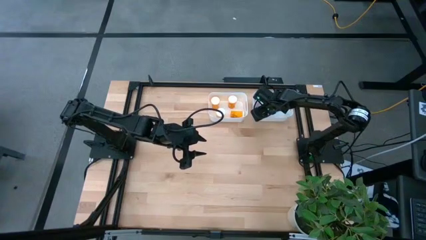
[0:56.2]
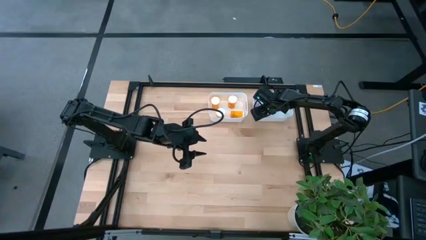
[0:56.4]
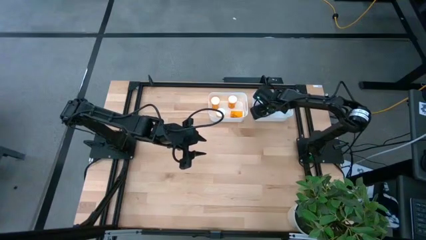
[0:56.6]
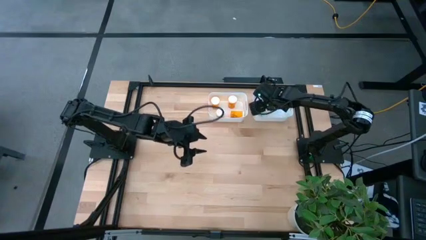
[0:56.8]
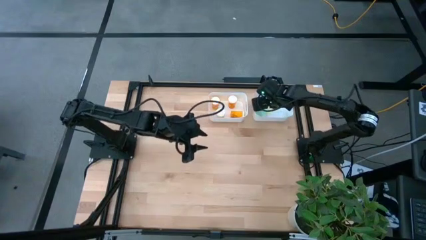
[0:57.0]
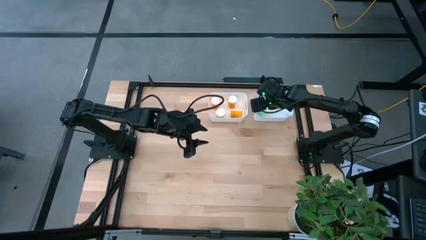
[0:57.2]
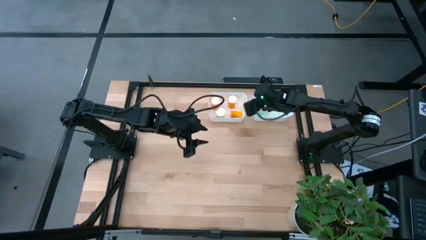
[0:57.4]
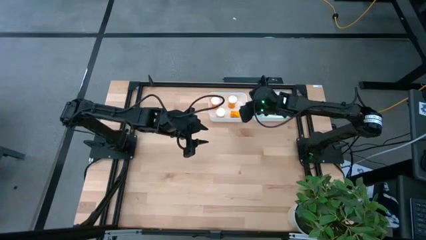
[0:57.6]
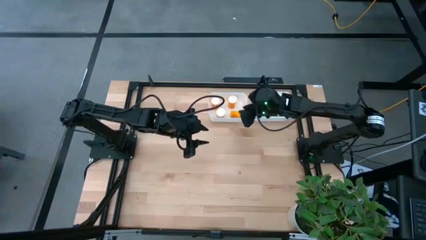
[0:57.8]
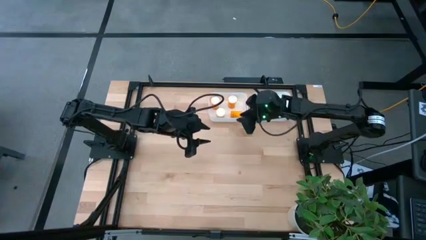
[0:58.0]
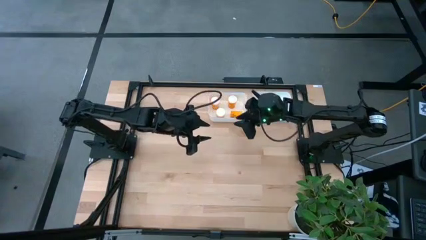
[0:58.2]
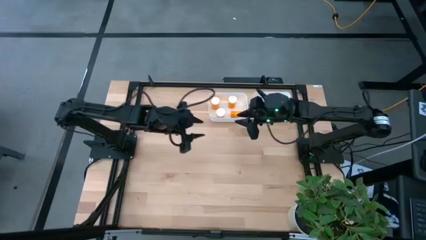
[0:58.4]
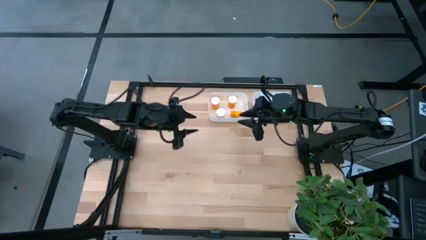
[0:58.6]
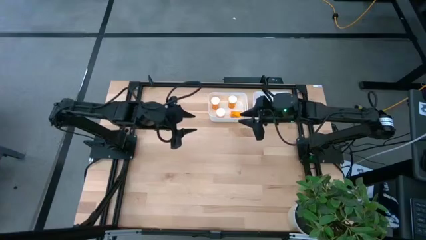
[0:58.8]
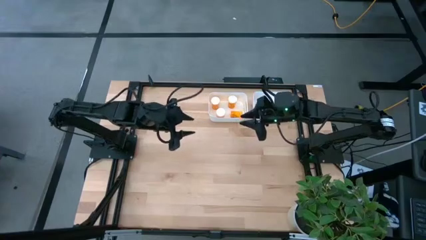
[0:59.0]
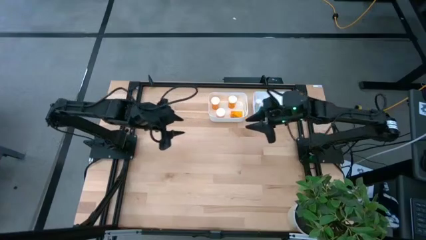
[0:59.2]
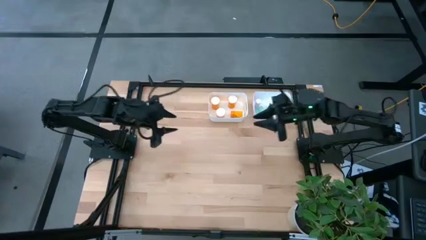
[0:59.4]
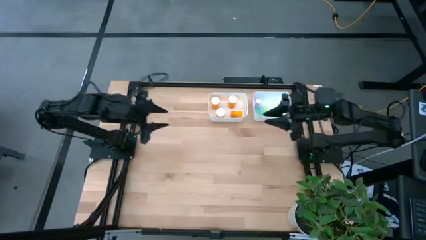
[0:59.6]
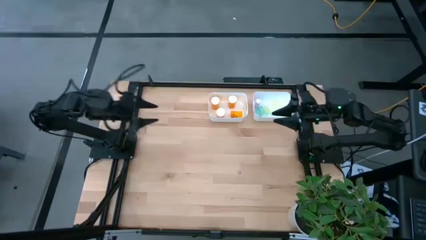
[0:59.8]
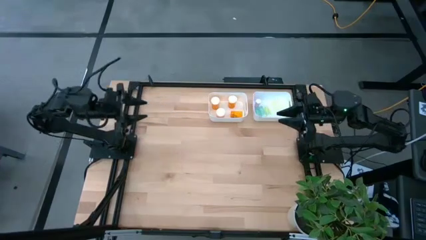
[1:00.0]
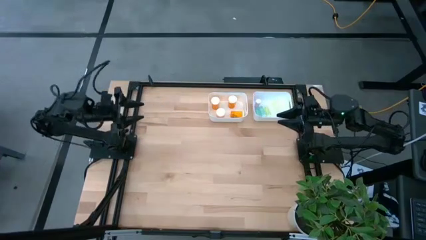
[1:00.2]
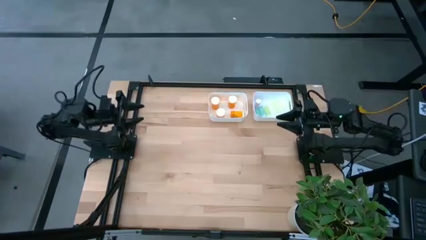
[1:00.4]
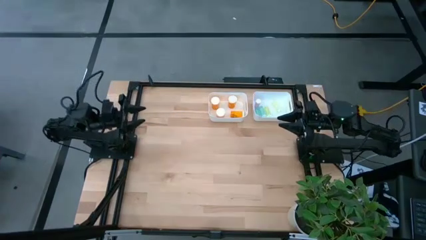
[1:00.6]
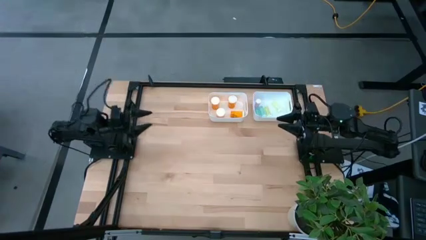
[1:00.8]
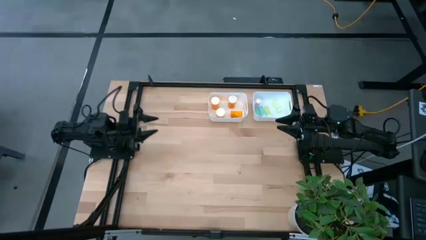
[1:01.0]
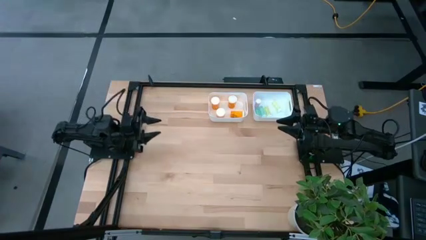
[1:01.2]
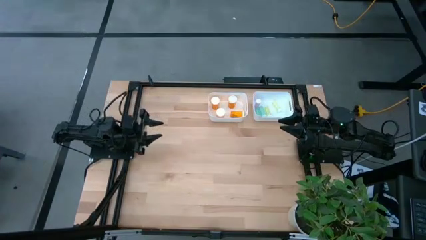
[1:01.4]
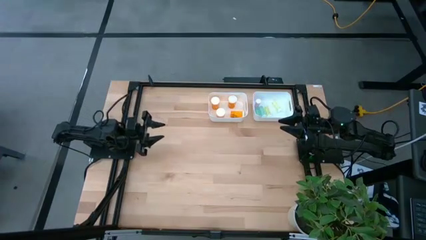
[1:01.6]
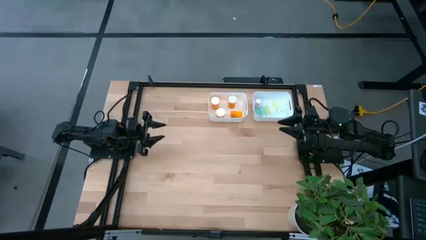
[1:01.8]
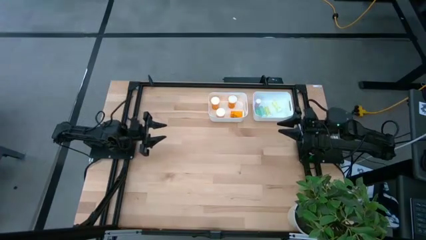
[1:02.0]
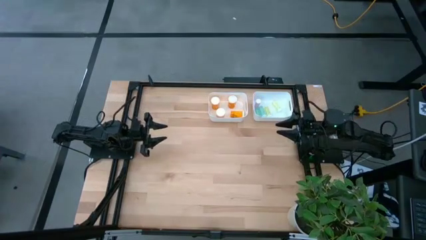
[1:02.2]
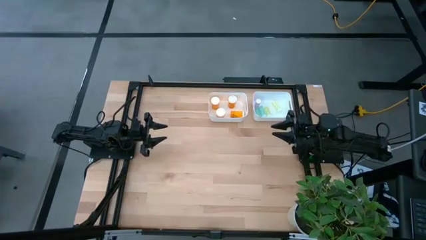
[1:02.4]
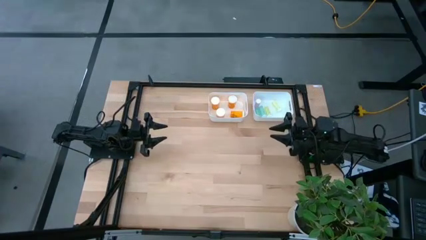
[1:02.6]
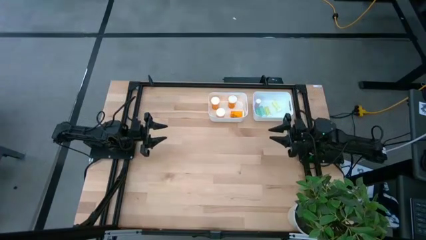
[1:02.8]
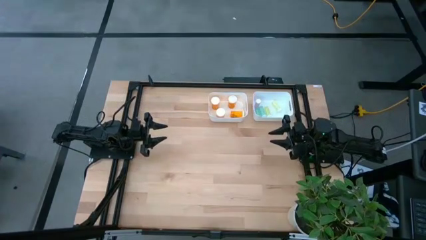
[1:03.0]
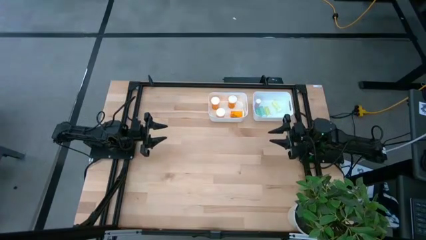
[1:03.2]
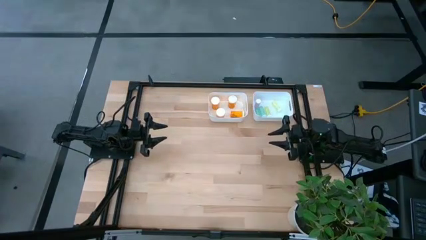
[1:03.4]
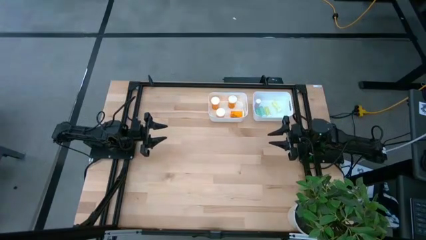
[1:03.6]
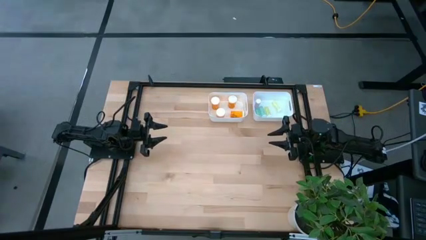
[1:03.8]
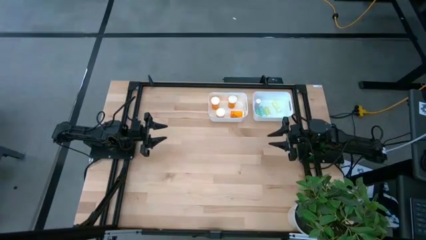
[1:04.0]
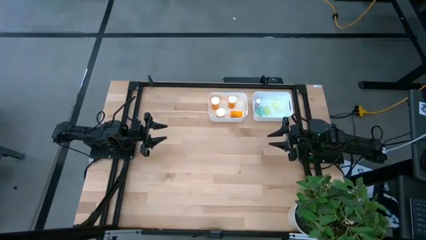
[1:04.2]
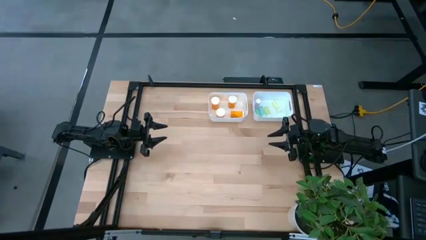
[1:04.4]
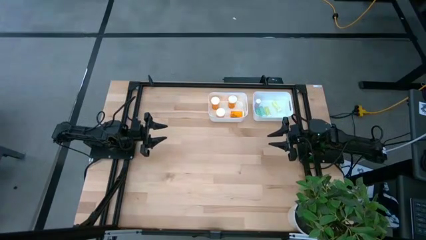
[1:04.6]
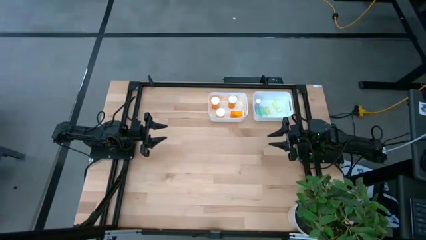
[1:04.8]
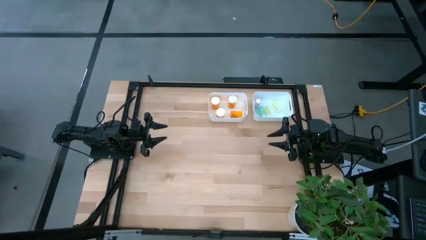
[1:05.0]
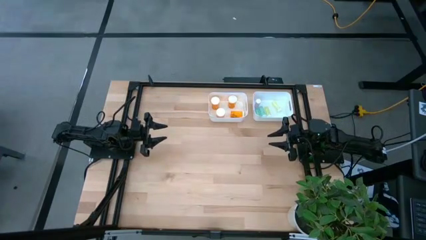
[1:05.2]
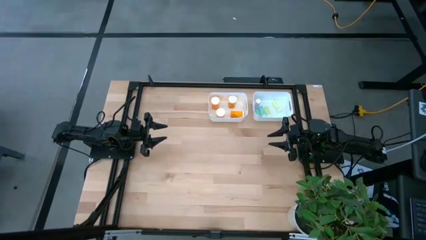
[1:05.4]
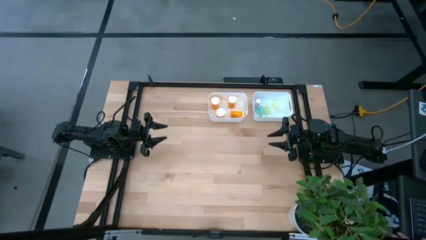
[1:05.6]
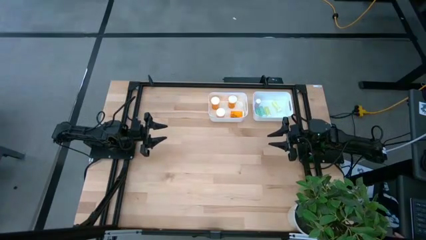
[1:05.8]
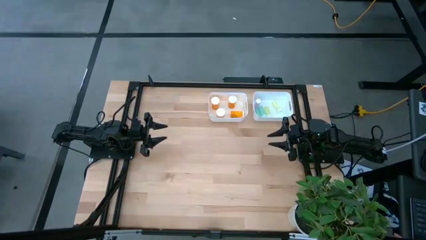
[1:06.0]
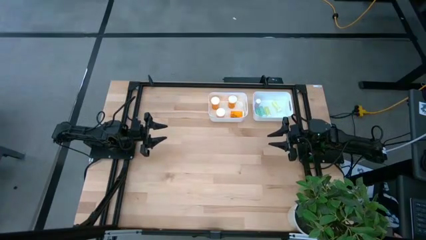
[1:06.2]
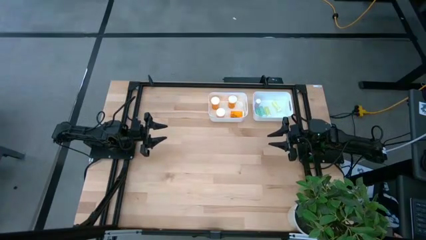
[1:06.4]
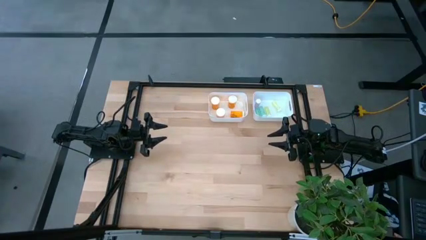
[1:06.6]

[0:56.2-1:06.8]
Task: Pick and place medicine bottles into bin by pill shape (circle, oval)
Return to Home Position

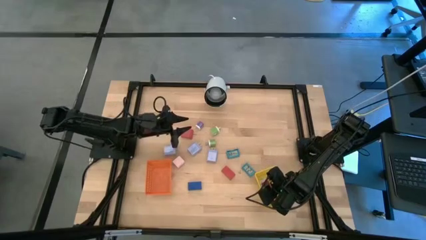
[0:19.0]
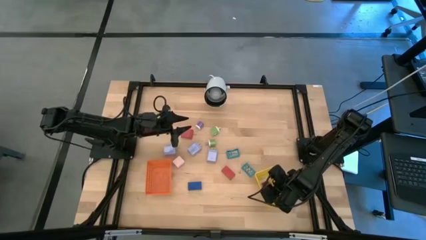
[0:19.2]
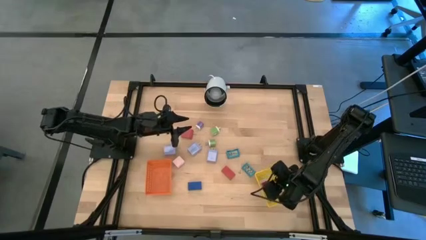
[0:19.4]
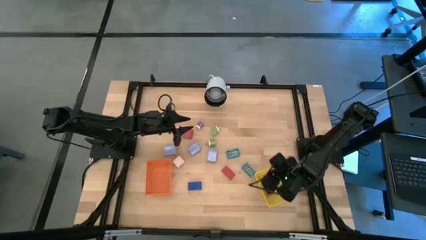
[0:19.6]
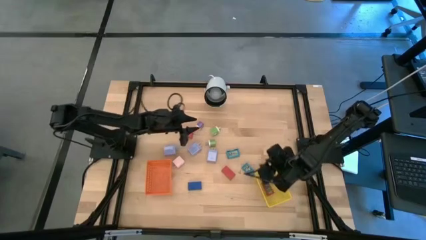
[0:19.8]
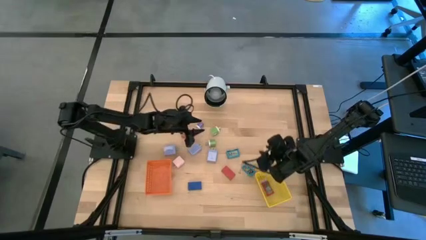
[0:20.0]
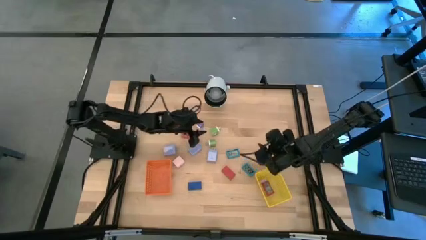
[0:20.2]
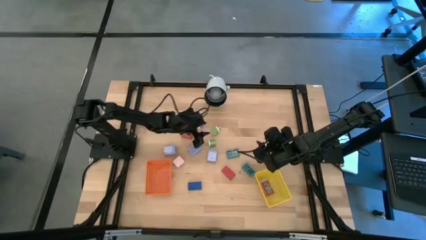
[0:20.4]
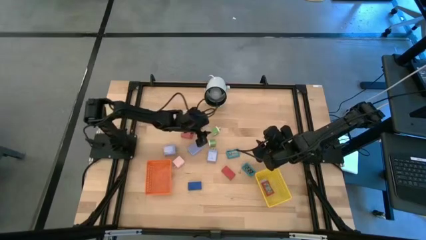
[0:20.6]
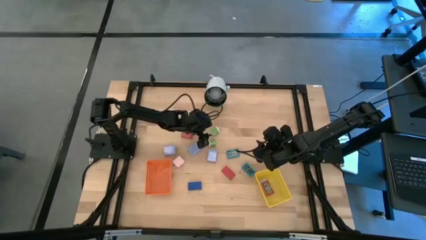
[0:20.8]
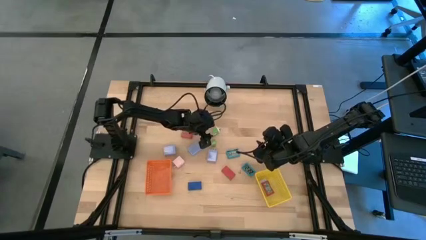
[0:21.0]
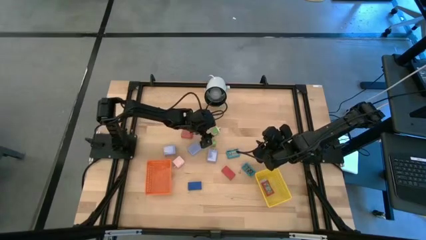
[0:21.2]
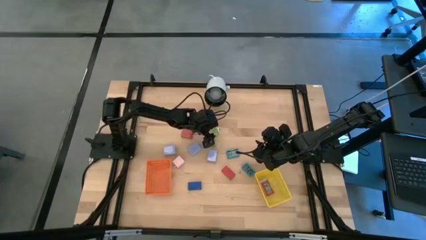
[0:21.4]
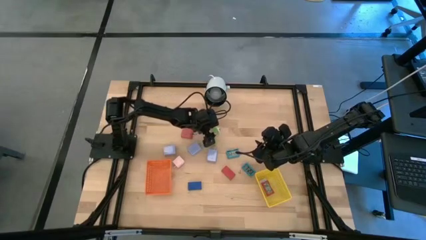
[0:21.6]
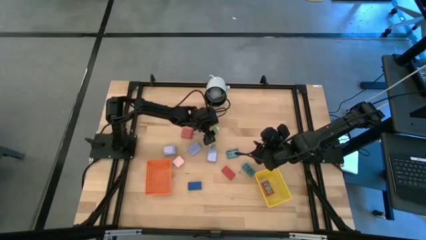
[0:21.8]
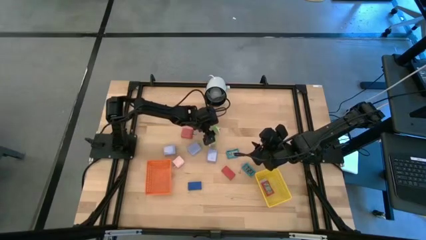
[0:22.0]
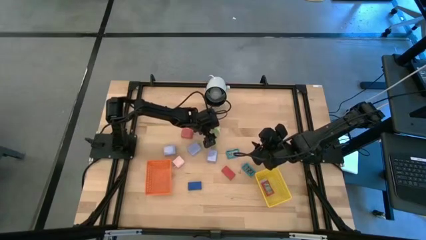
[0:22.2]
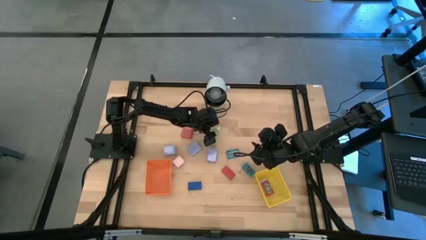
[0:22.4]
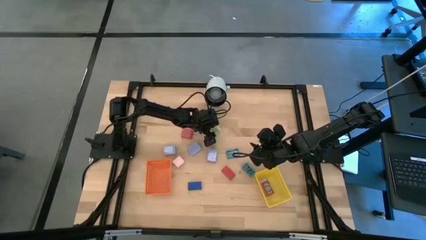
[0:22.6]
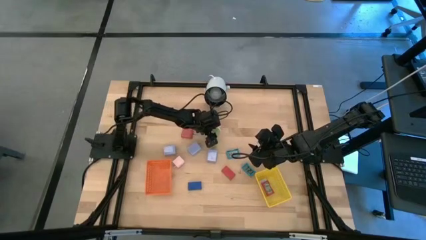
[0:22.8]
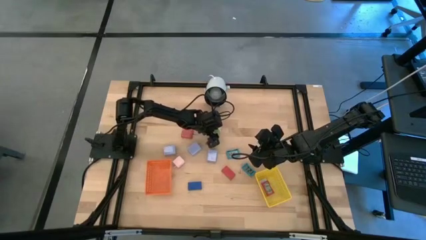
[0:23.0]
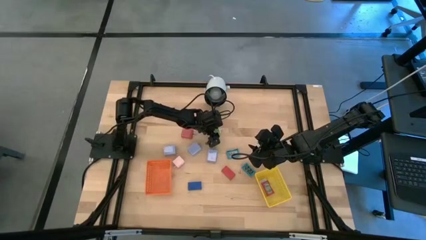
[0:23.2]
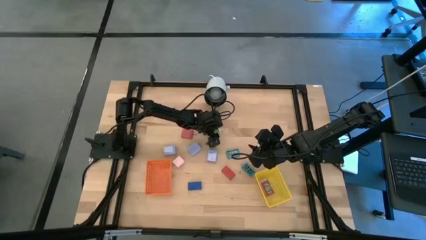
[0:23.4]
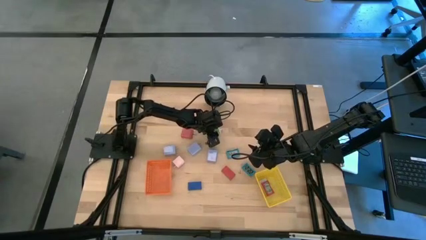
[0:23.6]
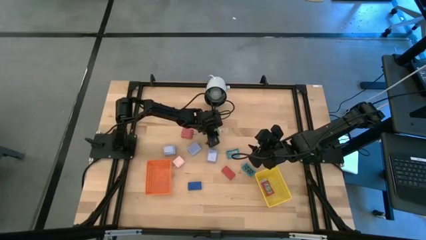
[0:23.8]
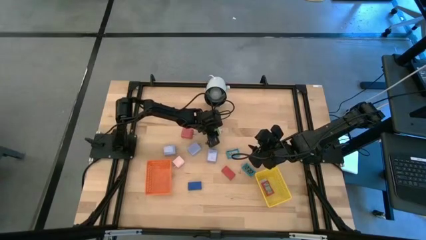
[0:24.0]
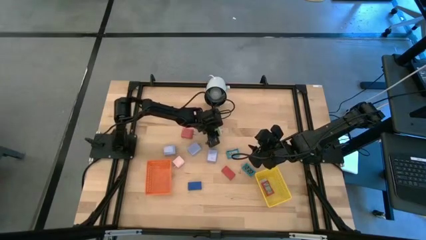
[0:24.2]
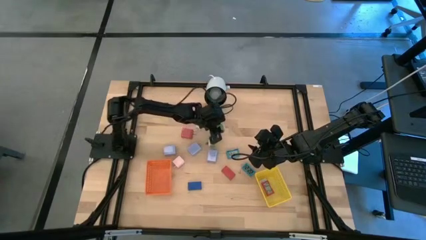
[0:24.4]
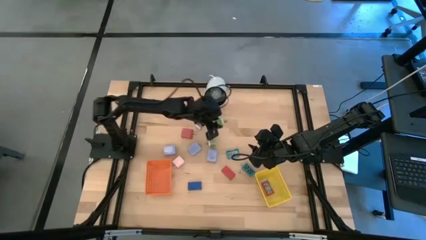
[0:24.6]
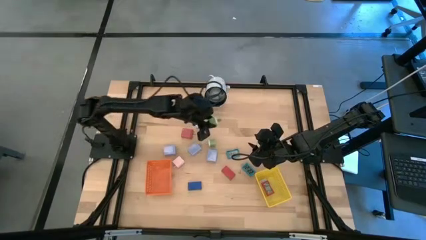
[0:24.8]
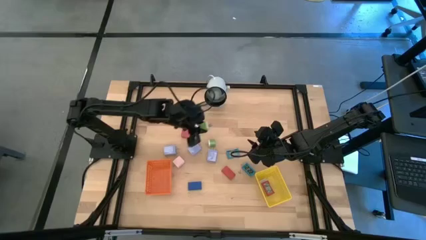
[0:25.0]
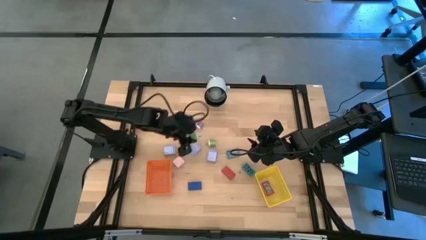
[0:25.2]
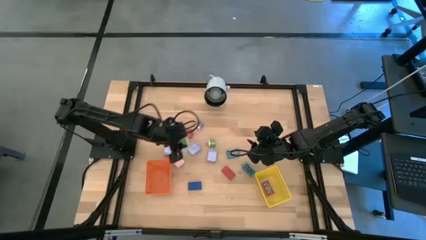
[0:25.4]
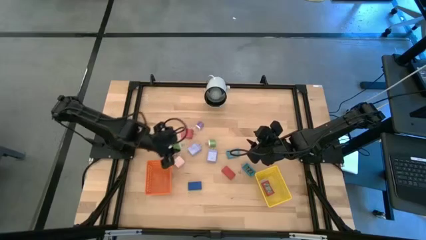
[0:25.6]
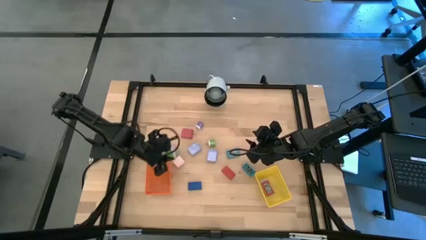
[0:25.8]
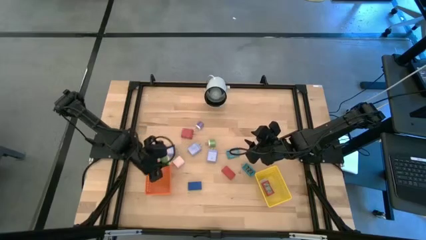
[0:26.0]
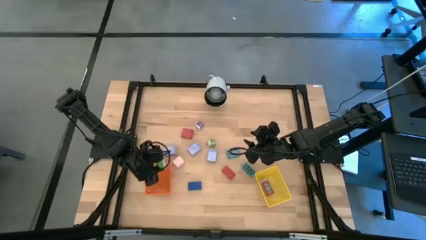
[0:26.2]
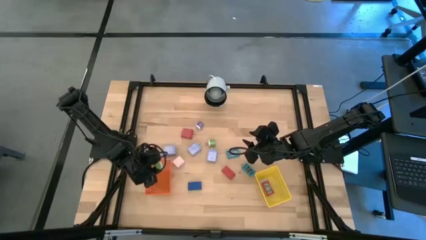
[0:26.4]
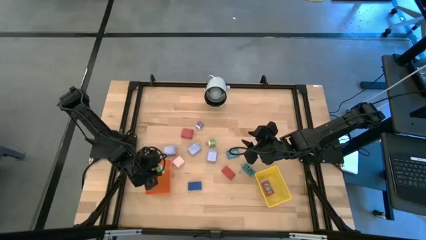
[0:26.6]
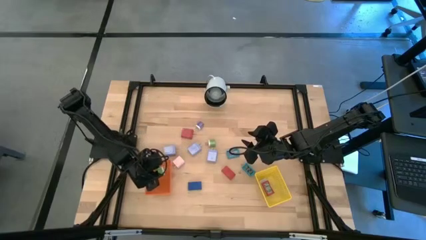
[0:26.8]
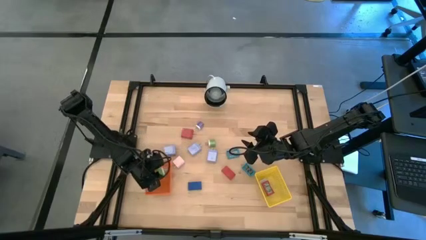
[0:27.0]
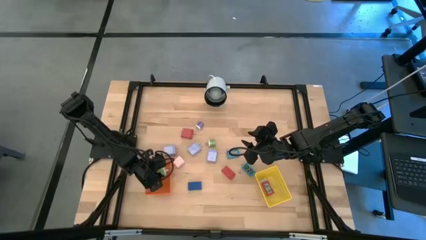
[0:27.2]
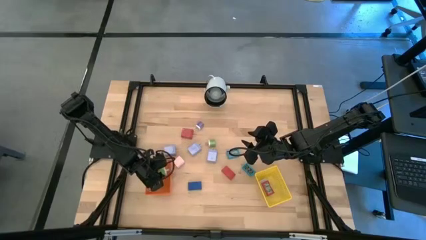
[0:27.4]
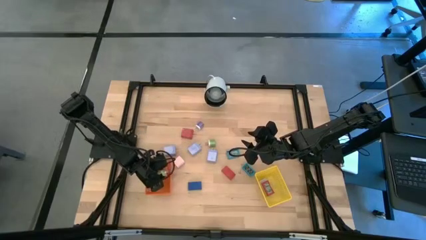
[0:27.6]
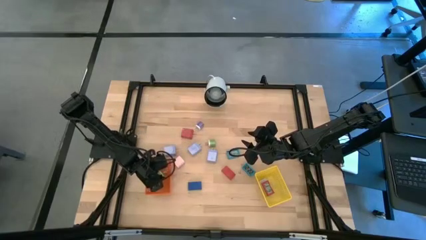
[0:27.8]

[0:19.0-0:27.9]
Task: Pick & Place Office items
Put the top green charger adapter into the orange basket
